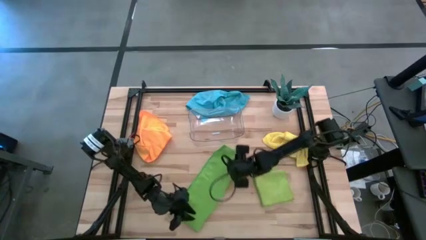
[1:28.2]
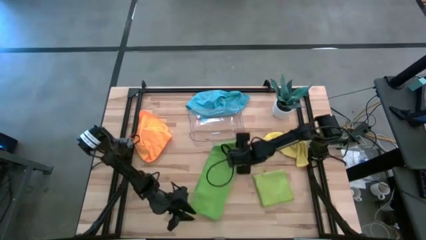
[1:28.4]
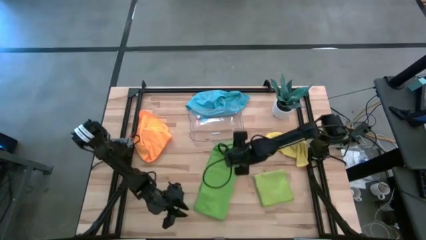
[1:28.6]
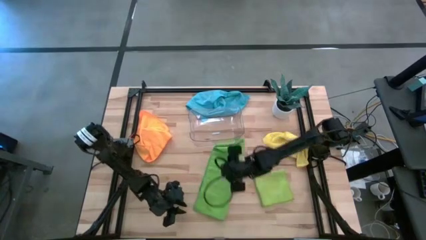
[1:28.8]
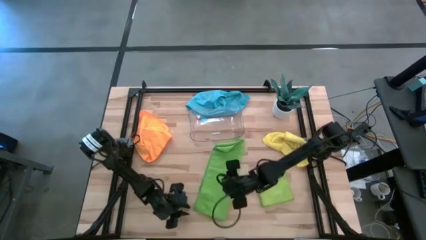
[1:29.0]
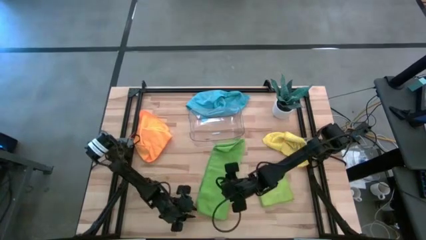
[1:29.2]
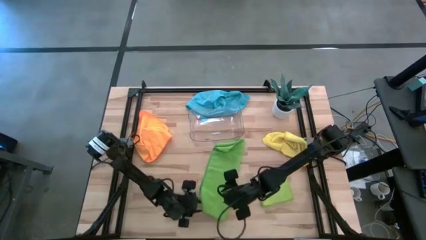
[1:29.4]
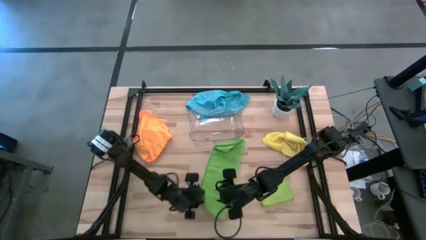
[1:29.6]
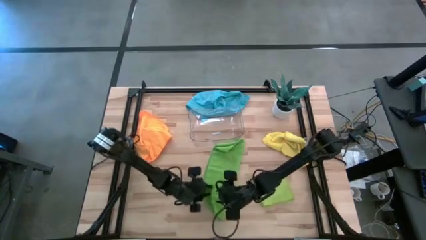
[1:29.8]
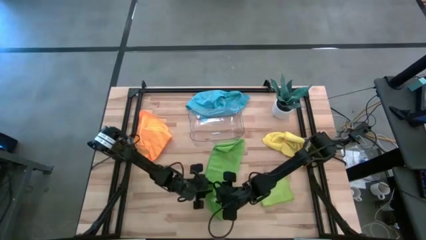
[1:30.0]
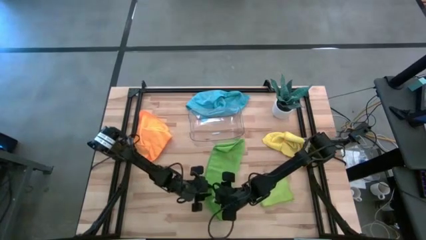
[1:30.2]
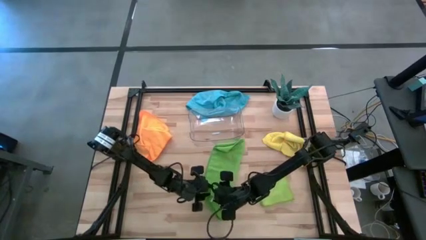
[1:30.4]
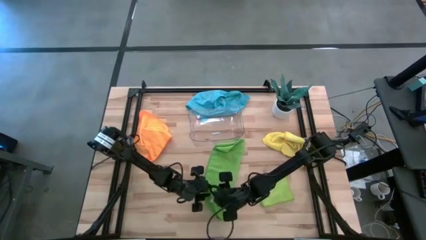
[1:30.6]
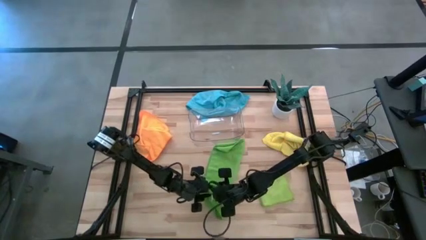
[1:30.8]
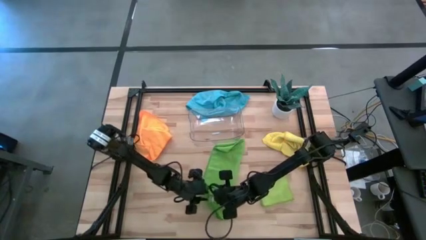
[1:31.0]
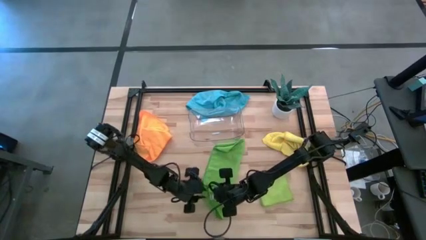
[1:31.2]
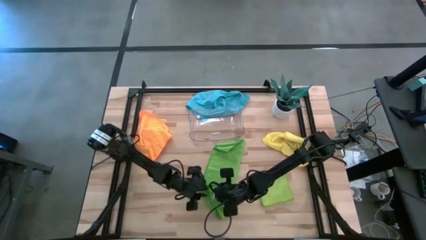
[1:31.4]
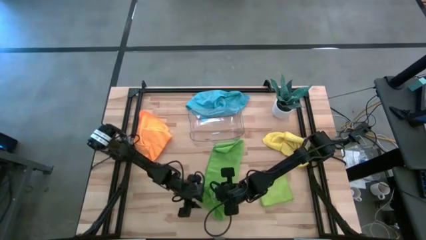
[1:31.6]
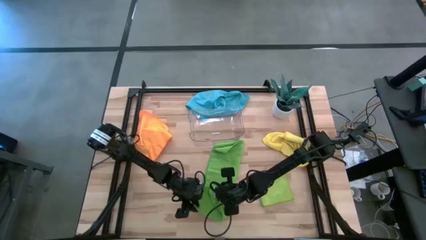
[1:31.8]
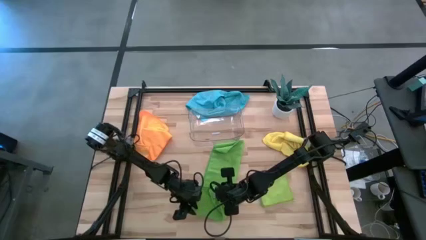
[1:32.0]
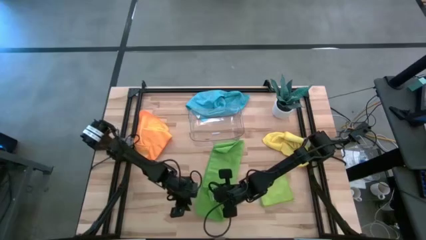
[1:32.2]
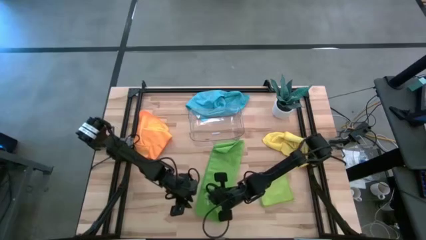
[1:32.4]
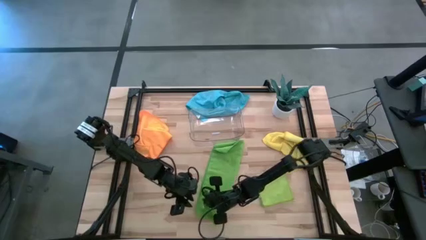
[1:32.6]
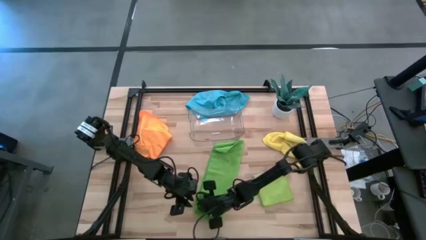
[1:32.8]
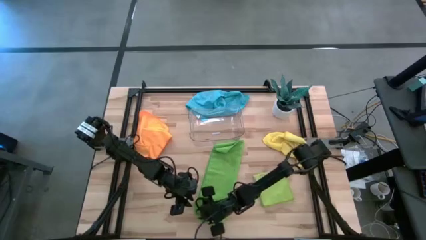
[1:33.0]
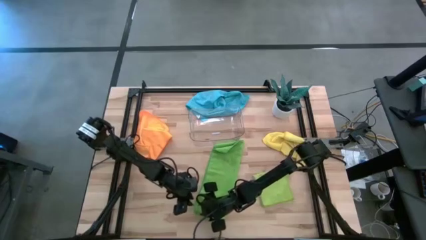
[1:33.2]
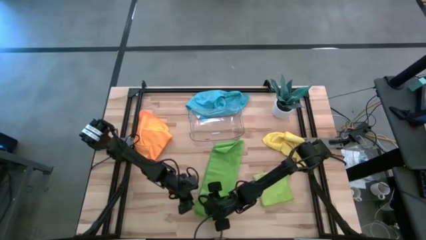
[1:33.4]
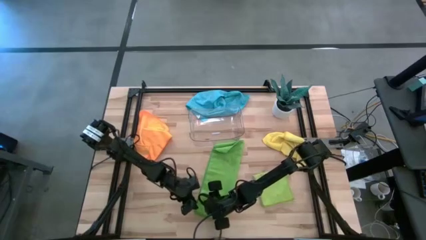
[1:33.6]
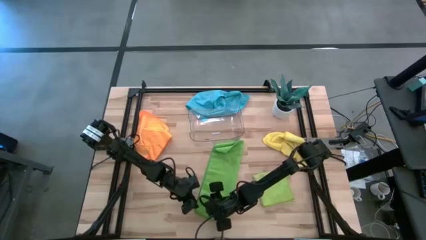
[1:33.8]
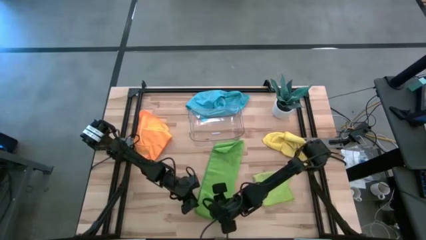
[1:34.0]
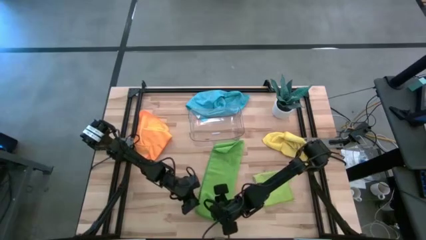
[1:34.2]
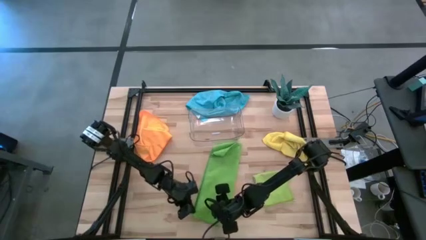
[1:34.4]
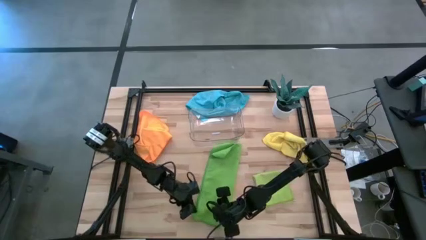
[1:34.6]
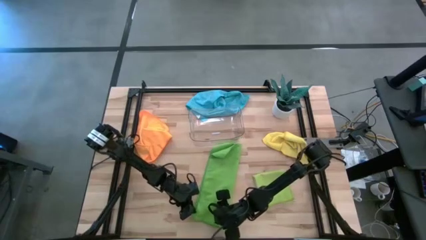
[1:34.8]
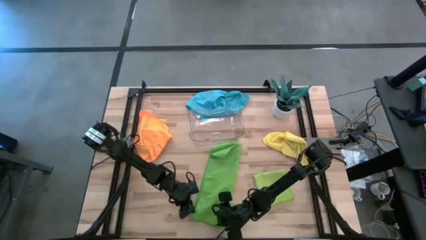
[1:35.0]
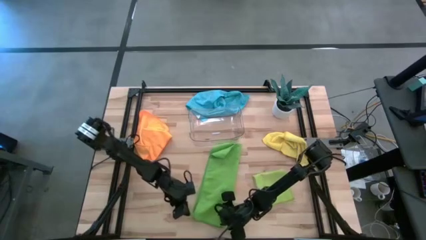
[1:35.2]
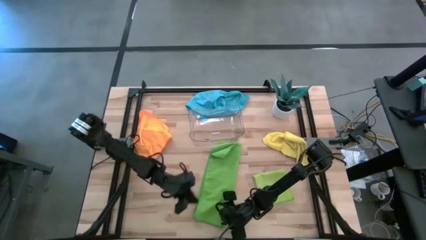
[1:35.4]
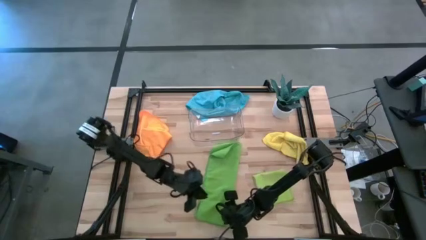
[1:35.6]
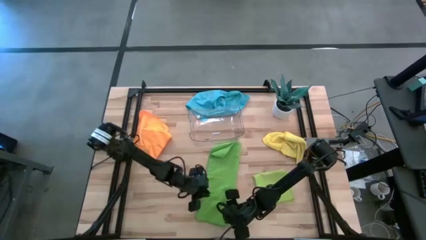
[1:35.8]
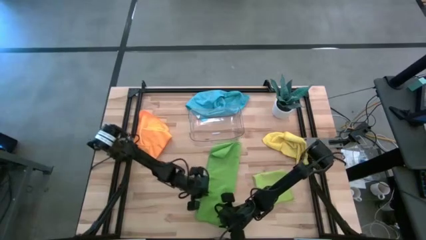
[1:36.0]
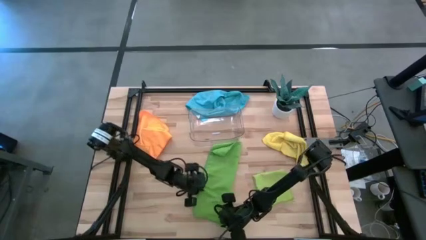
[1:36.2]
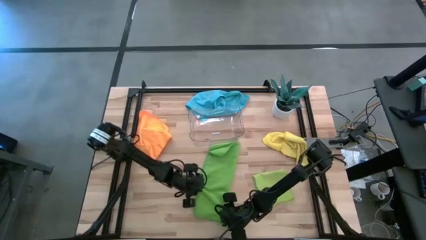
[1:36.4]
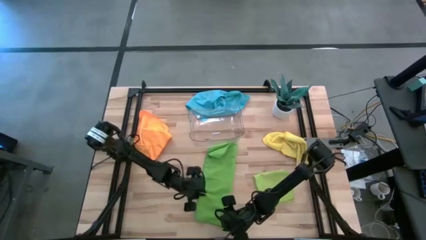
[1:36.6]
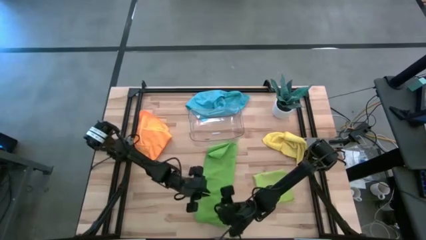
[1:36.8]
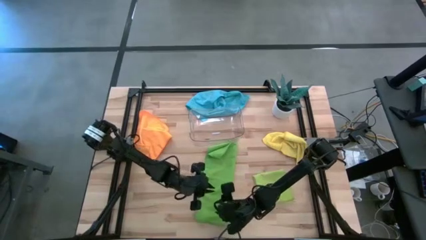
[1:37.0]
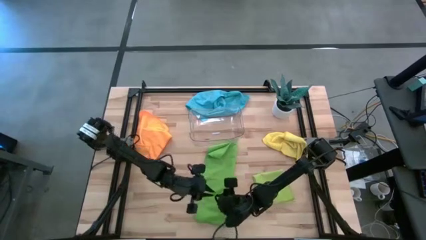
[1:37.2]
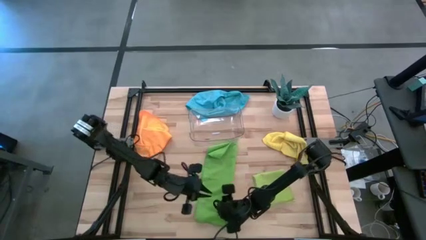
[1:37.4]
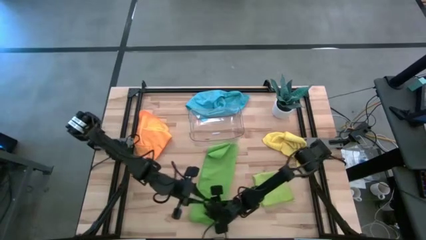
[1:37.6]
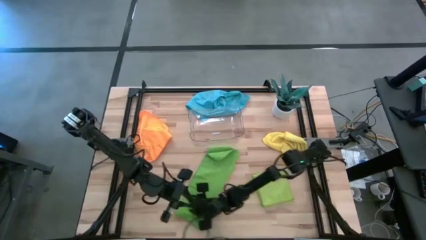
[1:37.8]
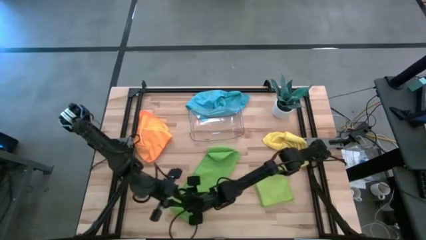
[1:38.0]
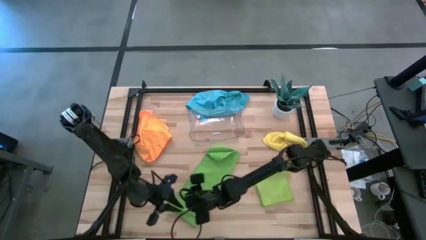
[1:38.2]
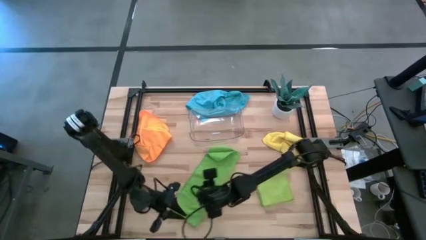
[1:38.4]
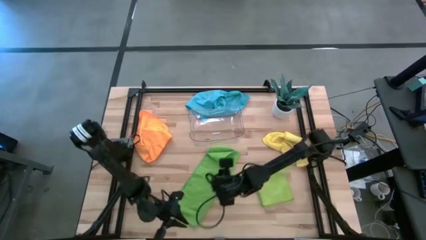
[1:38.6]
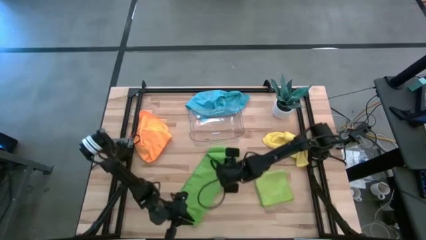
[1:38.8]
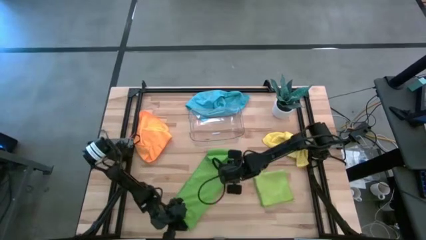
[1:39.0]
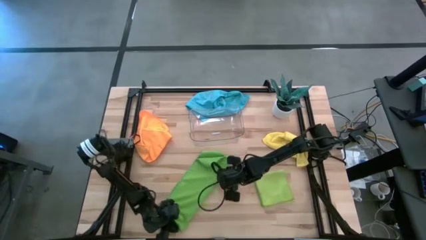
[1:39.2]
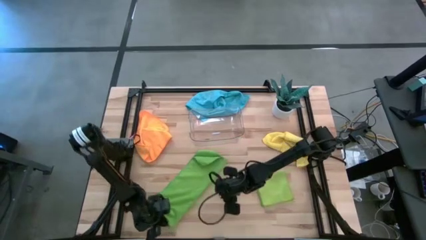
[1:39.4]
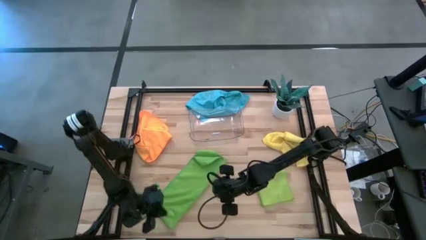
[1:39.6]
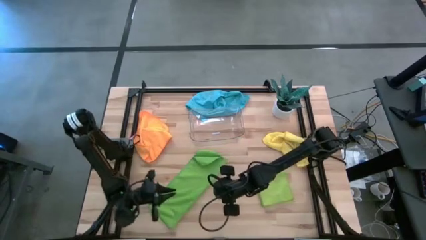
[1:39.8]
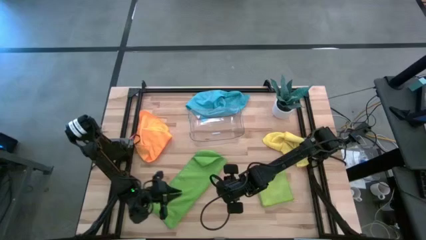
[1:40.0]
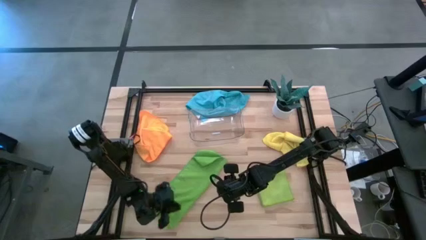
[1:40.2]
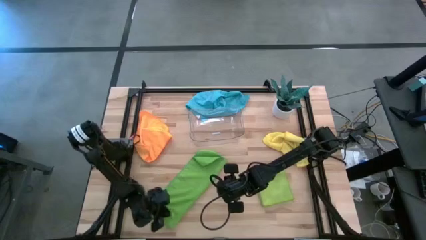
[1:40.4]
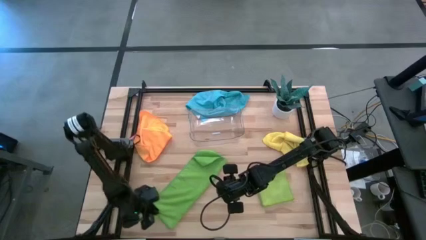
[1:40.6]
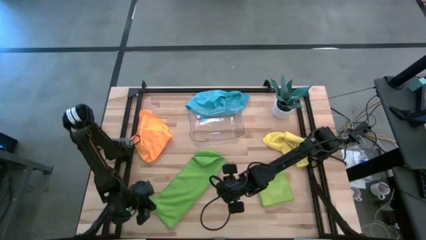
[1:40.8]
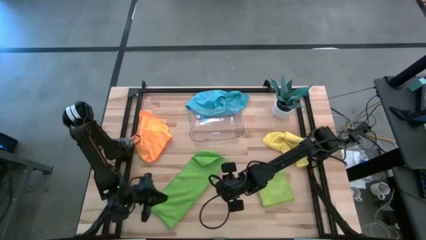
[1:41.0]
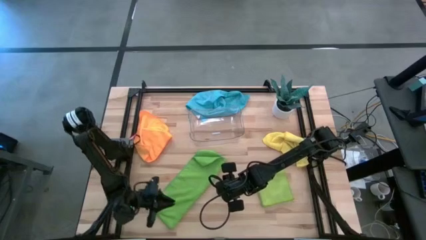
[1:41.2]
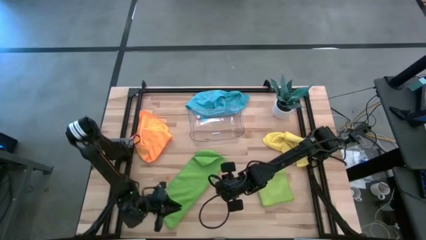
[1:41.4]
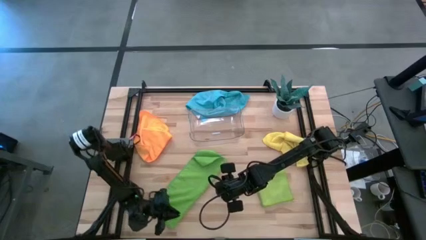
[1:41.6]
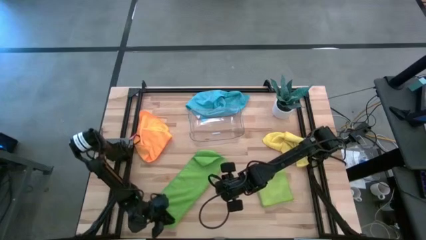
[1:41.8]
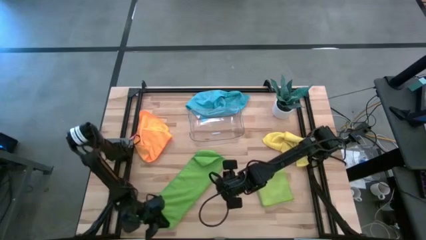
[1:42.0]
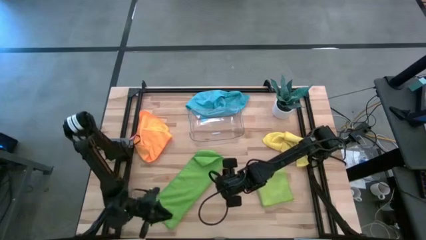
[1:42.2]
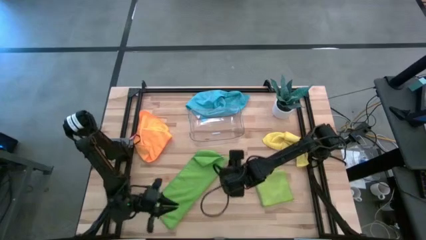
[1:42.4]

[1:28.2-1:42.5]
Task: Fold microfiber towels
Fold the green microfiber cloth

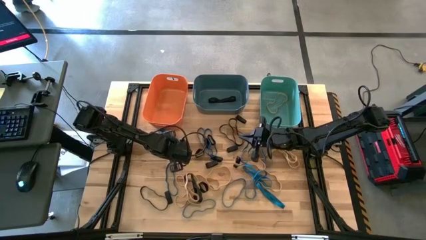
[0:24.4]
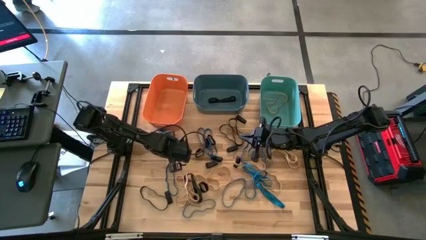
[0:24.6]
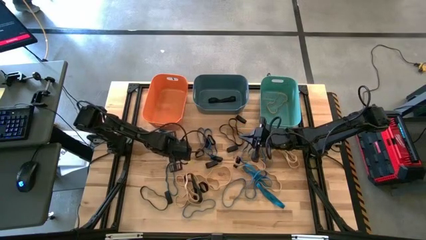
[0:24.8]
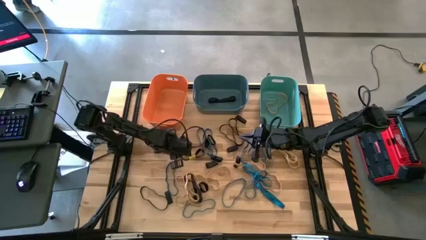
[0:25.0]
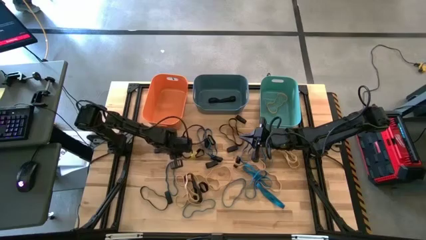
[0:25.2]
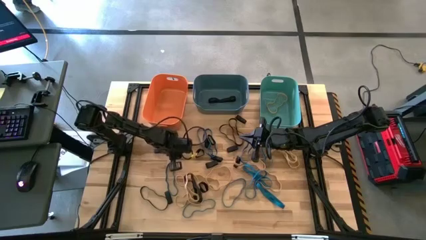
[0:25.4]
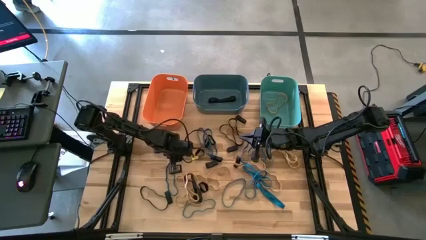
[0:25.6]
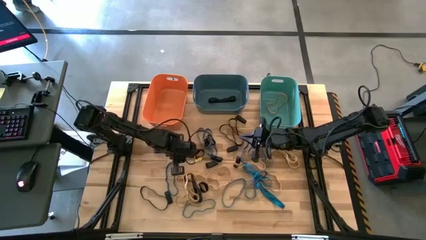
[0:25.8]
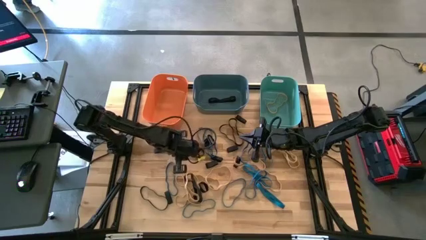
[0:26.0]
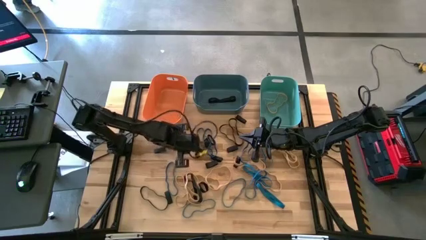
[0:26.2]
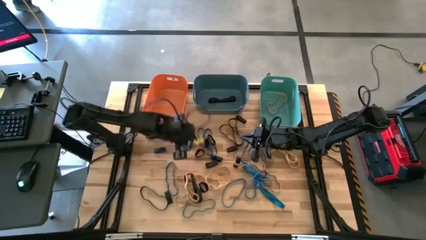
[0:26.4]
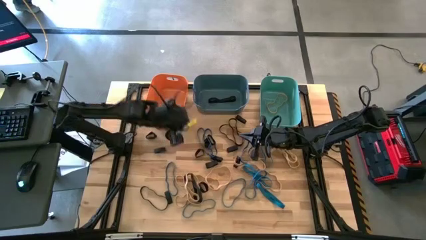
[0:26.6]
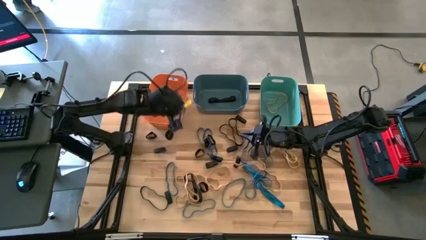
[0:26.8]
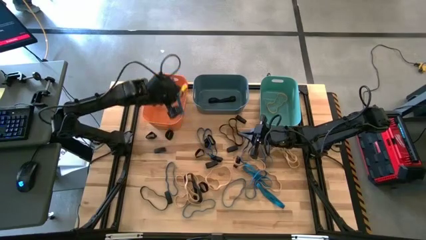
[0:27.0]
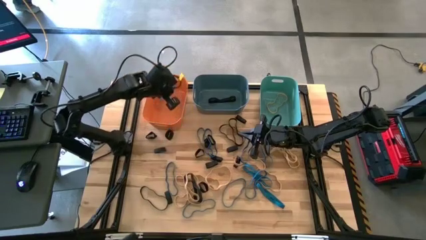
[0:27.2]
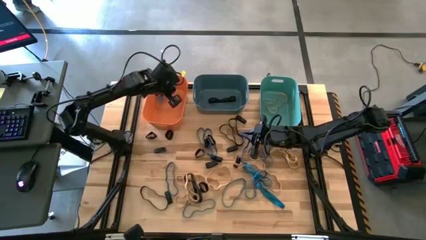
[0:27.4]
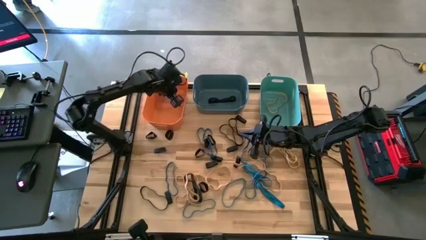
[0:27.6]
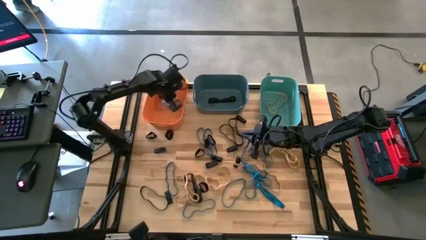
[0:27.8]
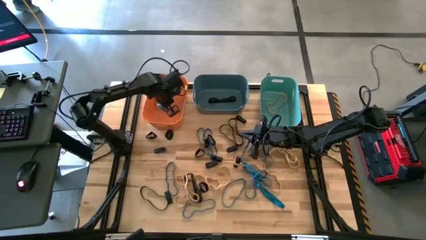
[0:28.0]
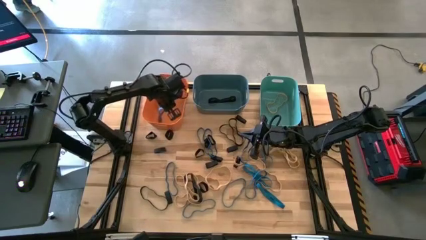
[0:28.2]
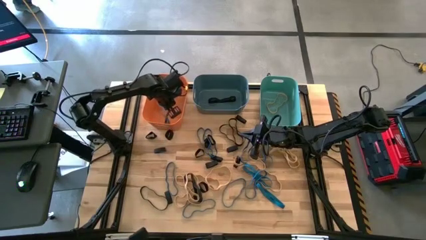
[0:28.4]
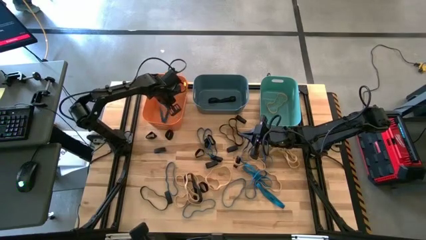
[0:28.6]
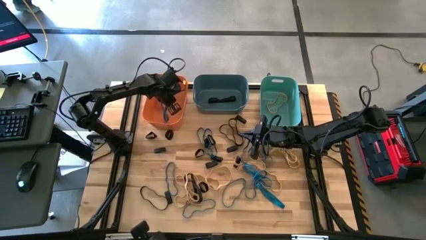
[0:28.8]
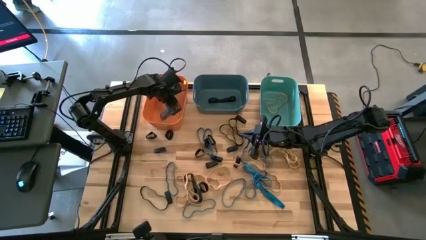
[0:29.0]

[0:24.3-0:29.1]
Task: Sort rubber bands into baskets
Put the blue rubber band into the orange bin
